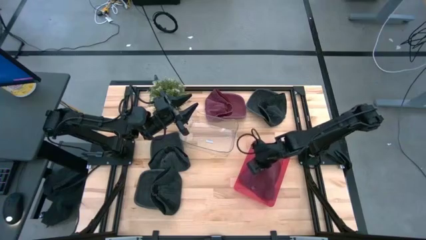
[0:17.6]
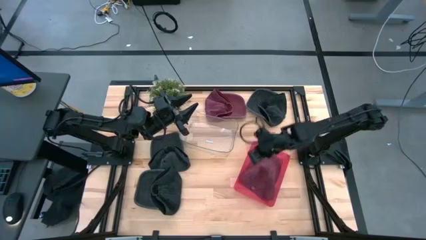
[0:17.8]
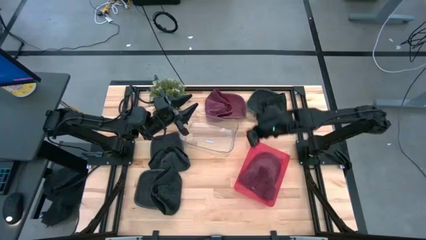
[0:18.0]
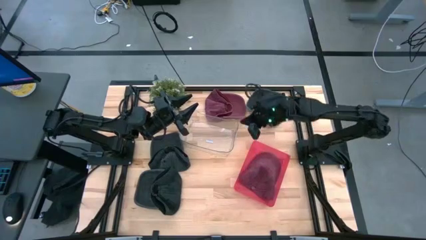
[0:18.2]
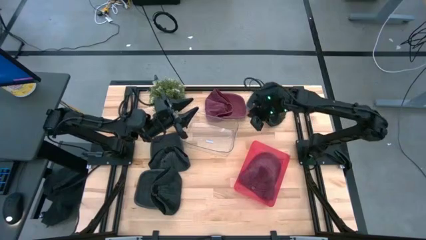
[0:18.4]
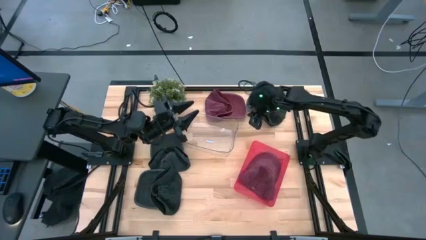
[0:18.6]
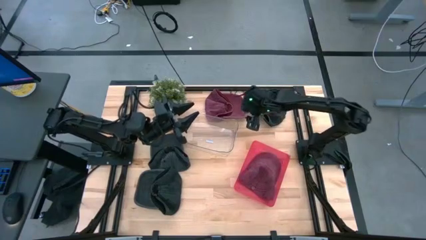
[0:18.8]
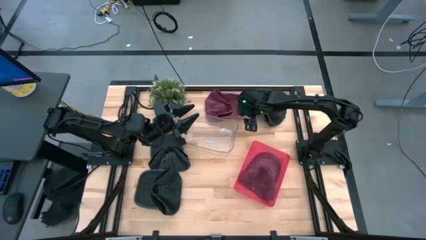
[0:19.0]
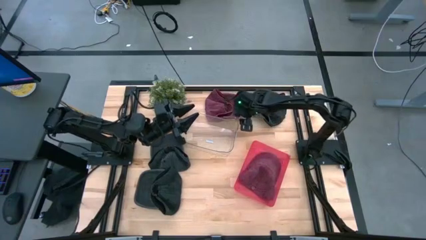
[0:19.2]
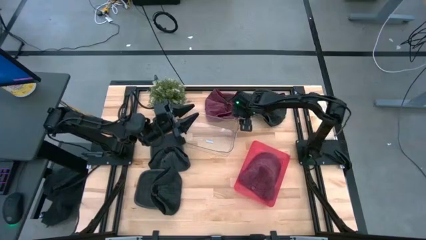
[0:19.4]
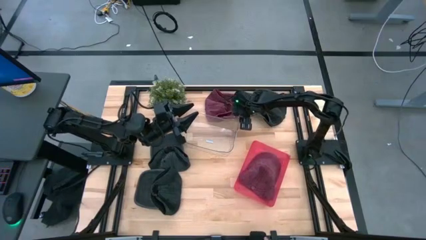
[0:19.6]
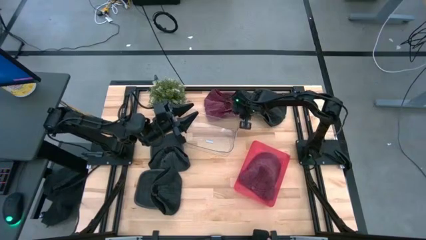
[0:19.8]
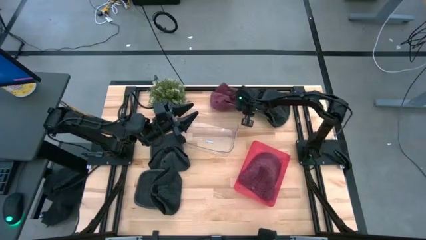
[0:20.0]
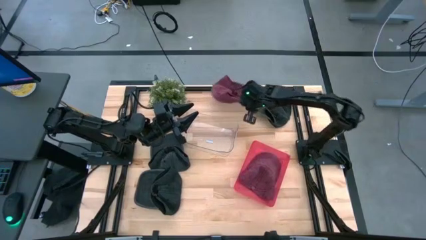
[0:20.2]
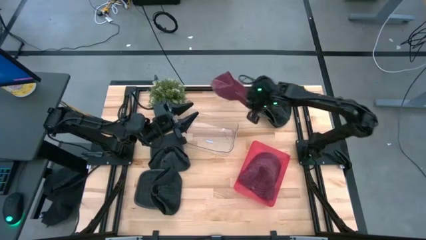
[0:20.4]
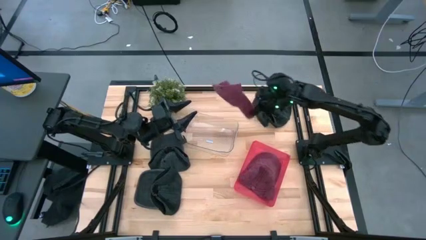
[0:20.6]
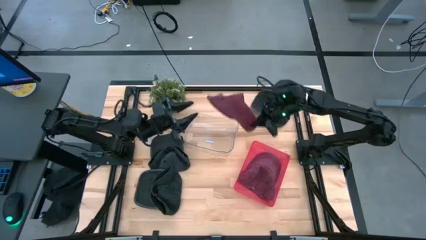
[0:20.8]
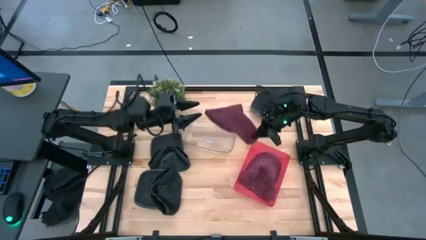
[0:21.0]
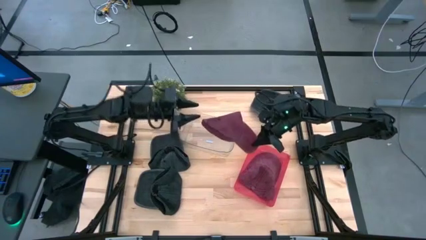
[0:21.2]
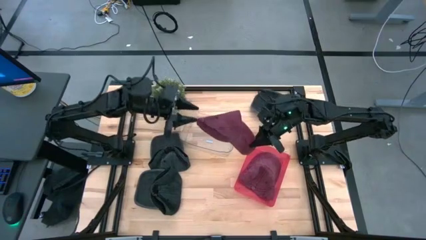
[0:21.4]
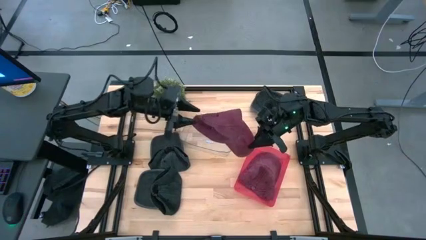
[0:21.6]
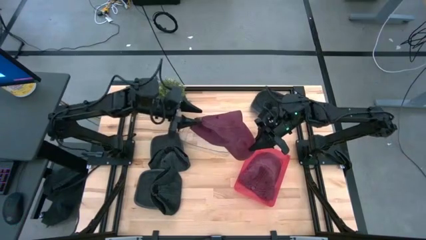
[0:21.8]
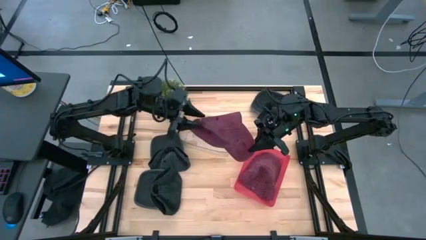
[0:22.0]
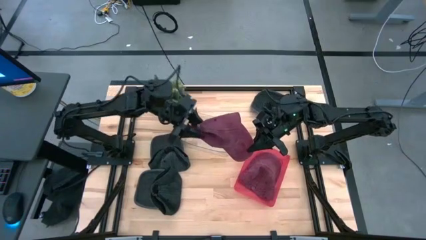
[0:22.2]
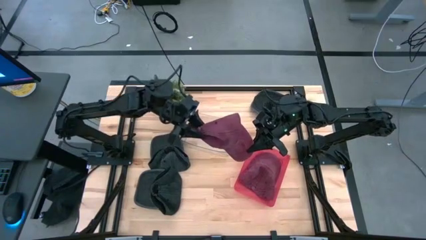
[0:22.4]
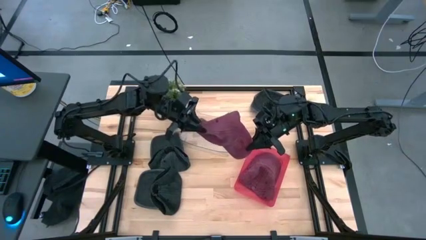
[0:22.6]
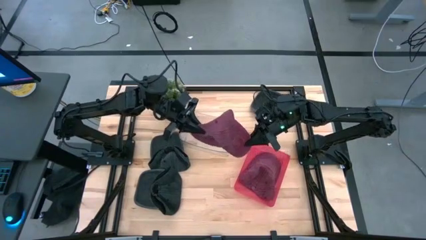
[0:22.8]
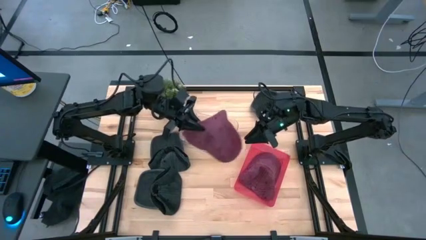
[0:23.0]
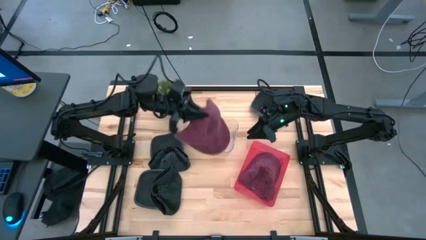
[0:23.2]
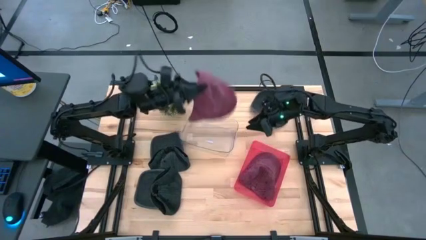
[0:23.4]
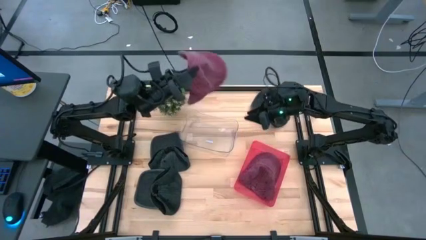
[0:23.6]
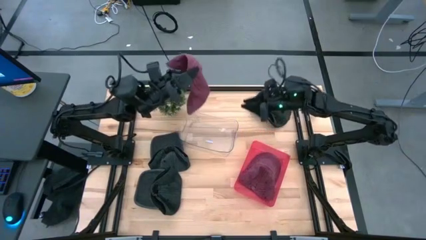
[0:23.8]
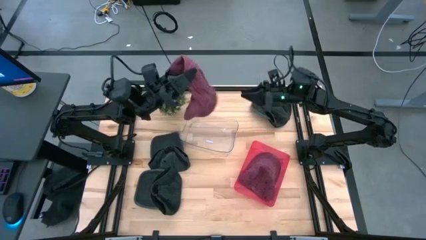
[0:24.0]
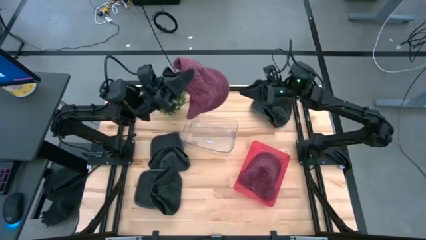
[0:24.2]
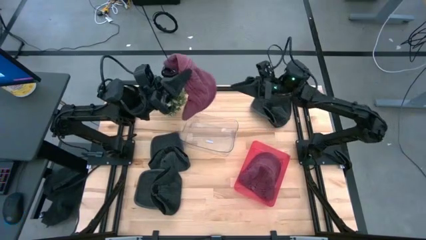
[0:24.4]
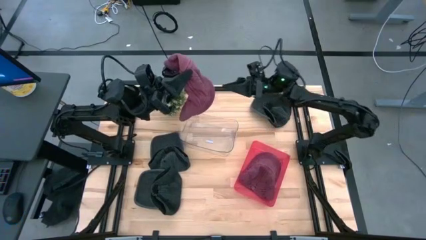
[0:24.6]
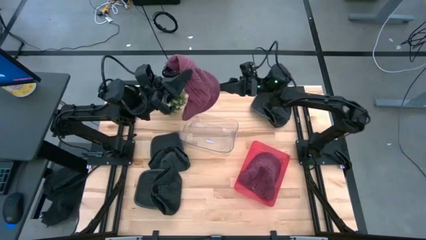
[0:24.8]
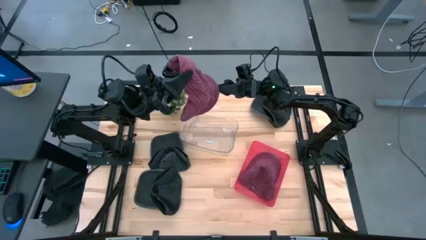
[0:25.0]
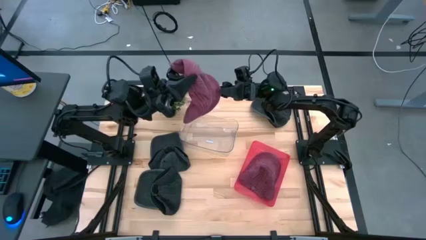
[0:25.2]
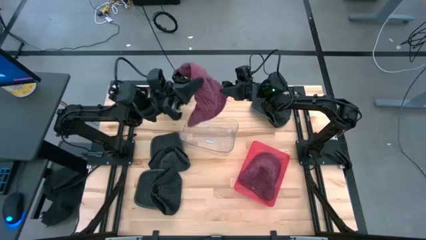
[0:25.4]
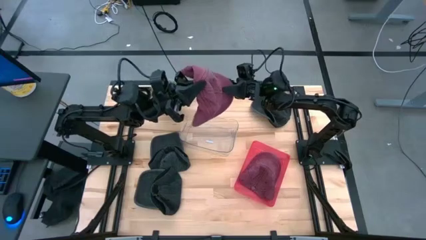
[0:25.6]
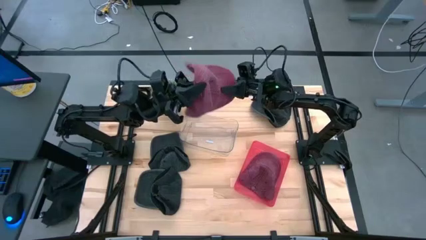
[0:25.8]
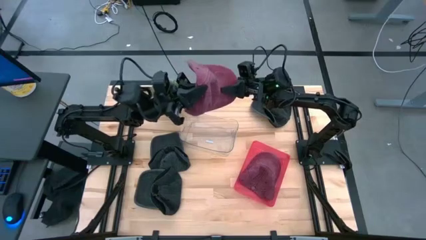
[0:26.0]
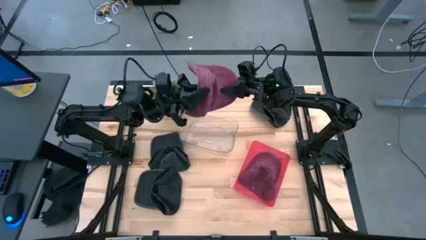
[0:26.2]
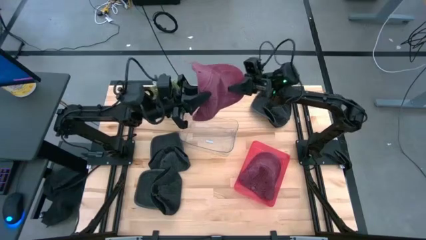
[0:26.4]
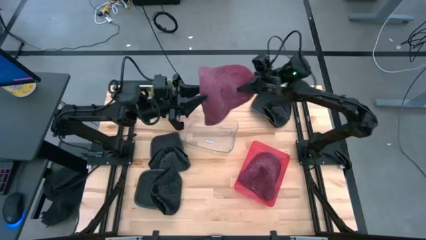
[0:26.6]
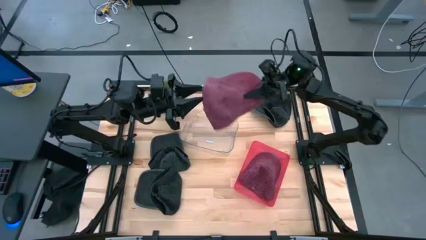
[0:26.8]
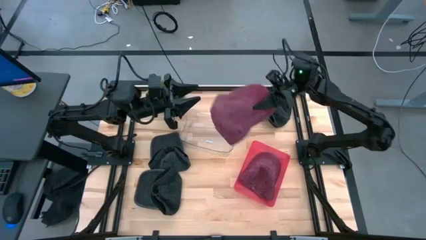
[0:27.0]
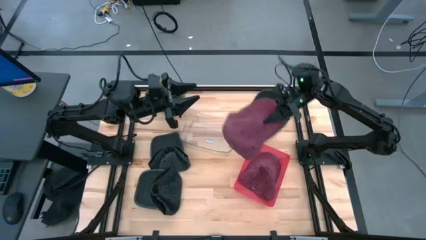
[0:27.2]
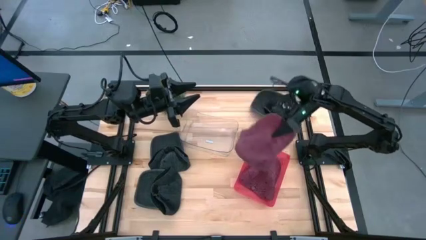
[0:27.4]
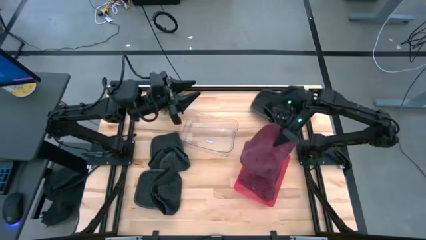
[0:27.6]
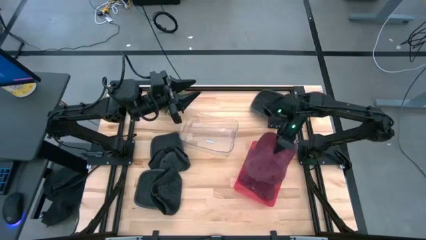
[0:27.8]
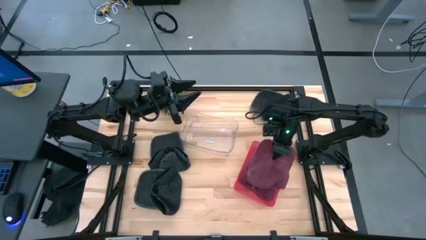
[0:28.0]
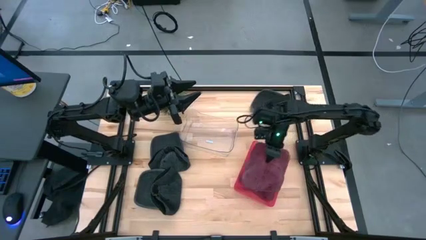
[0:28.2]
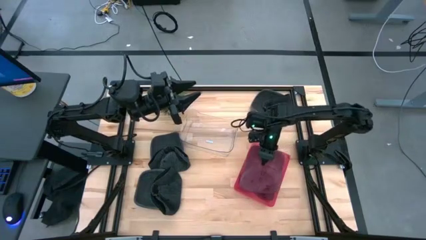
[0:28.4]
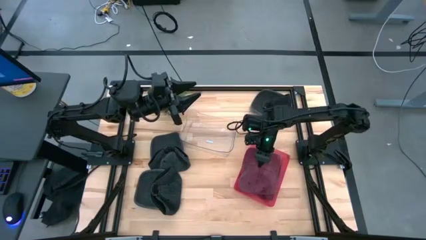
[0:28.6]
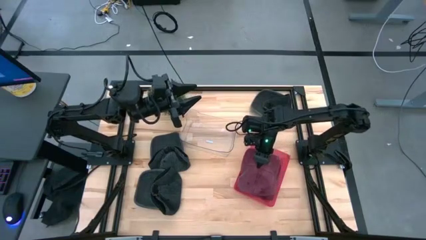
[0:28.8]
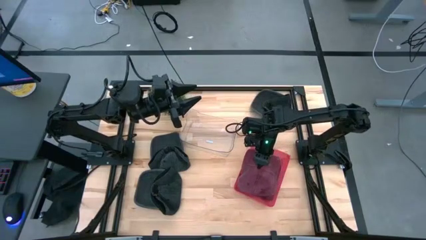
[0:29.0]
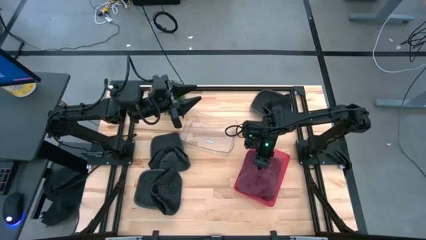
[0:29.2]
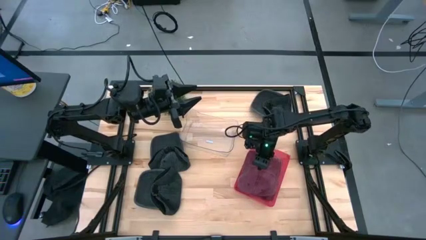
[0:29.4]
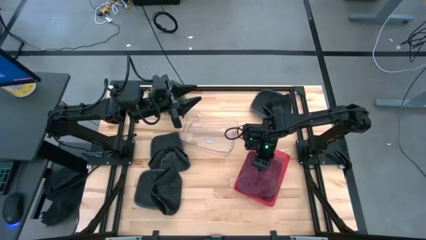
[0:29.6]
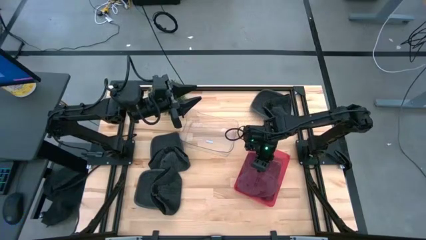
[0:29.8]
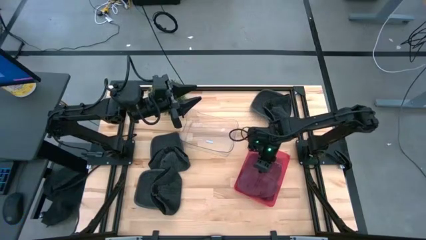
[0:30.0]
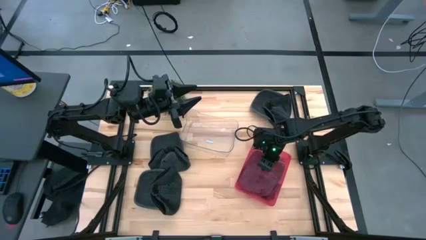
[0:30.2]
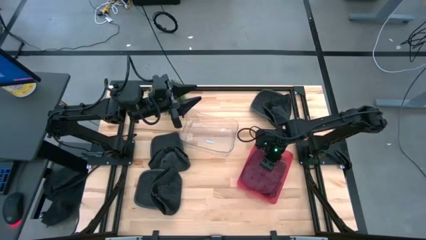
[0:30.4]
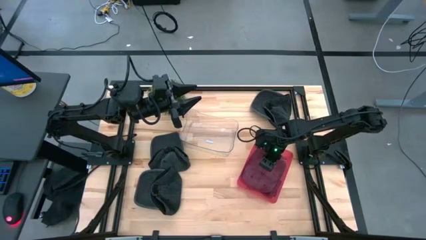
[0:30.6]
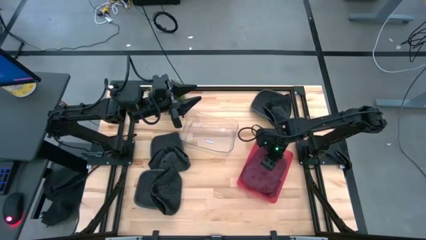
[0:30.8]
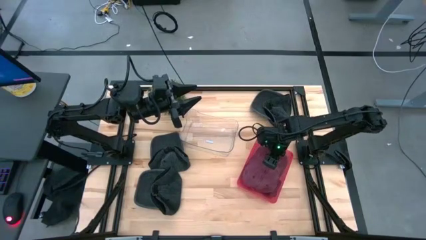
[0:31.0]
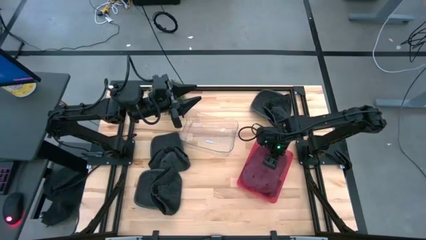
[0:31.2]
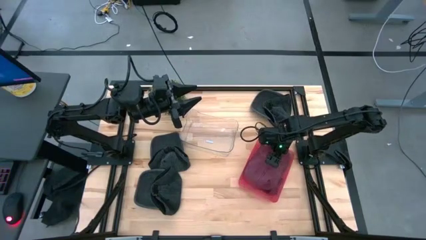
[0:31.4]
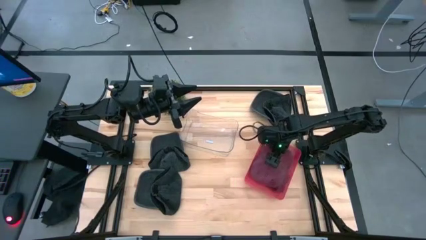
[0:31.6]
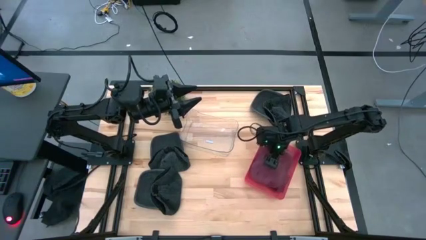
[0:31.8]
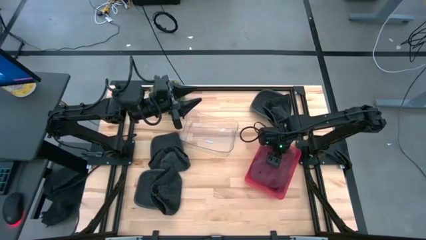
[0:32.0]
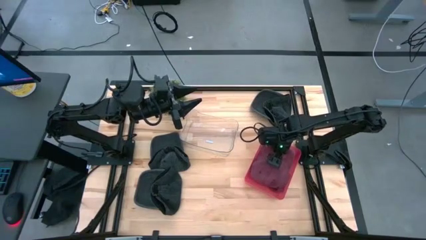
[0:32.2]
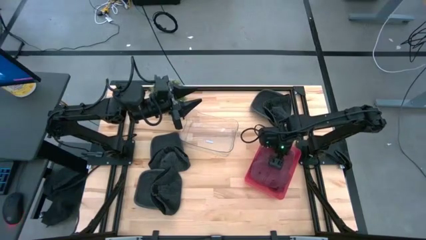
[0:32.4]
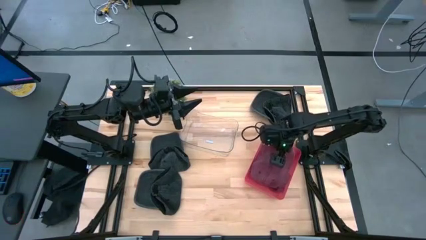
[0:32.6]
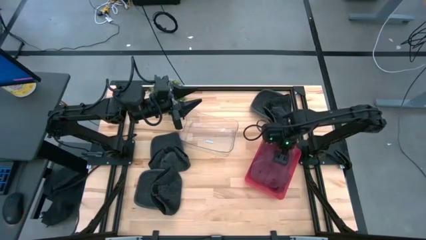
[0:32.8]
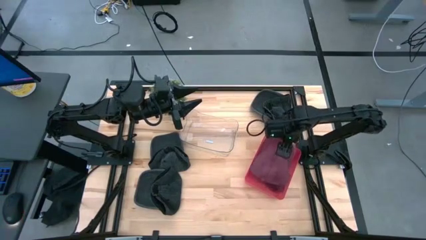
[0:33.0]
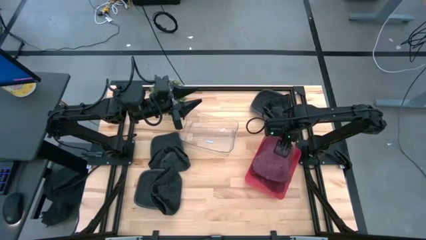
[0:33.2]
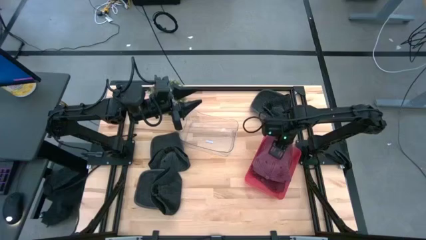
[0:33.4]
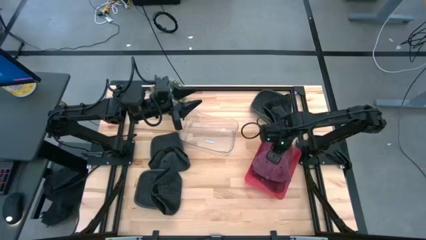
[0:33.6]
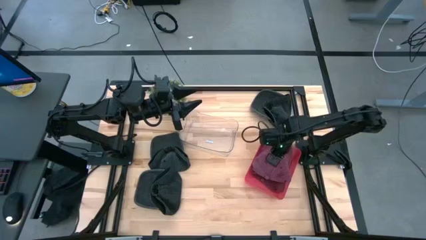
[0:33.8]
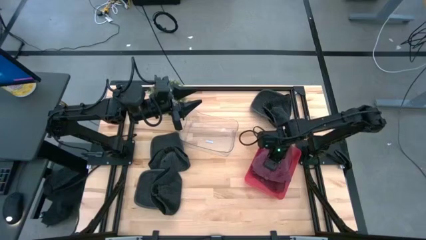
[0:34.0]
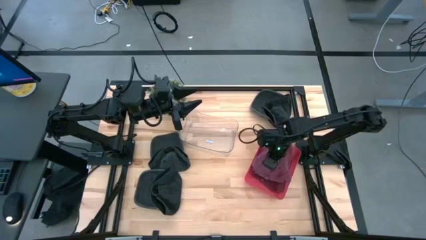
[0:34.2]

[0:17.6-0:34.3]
Task: Pick & Place hat
Put the red cap into the red bin
